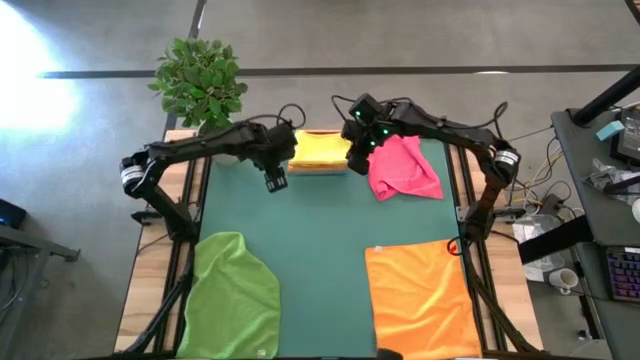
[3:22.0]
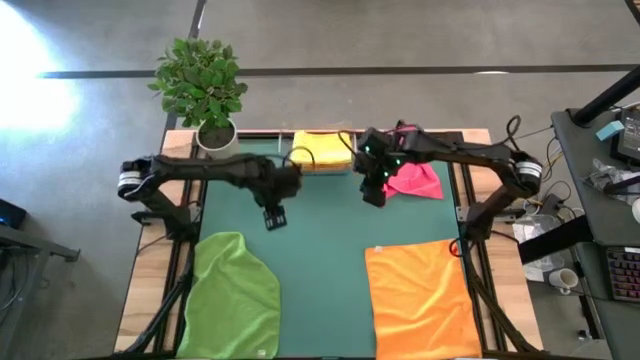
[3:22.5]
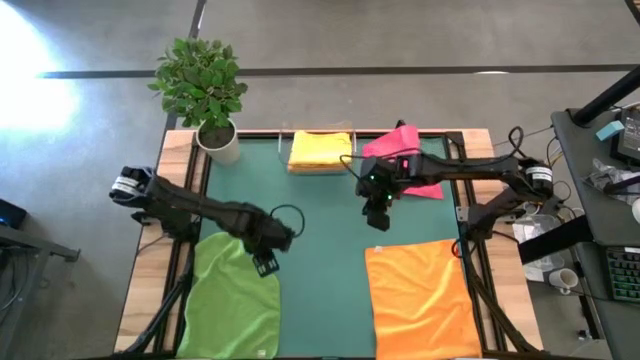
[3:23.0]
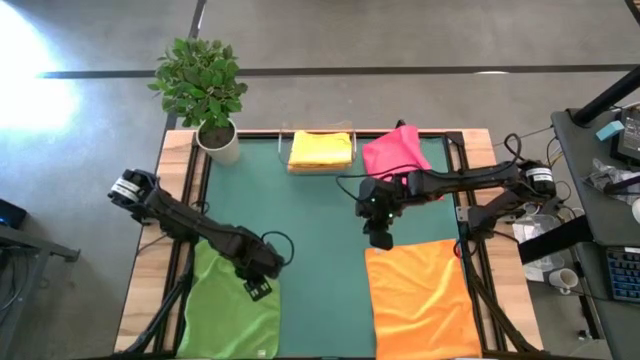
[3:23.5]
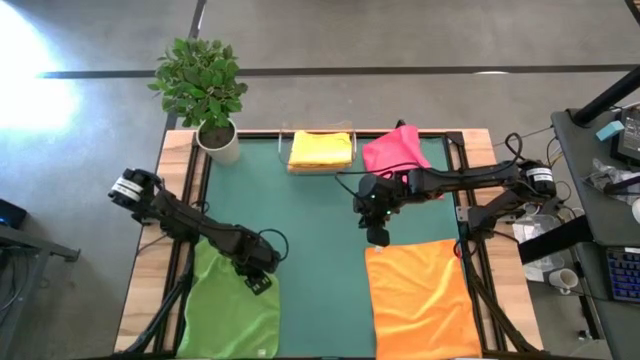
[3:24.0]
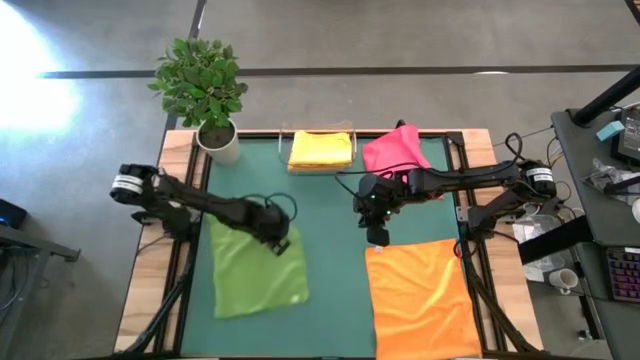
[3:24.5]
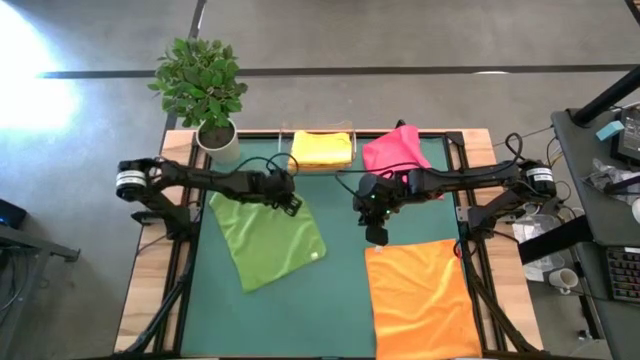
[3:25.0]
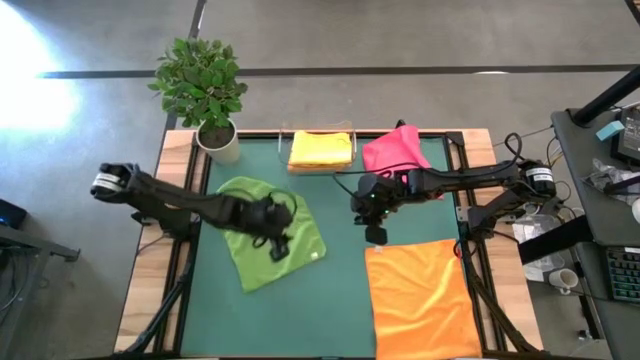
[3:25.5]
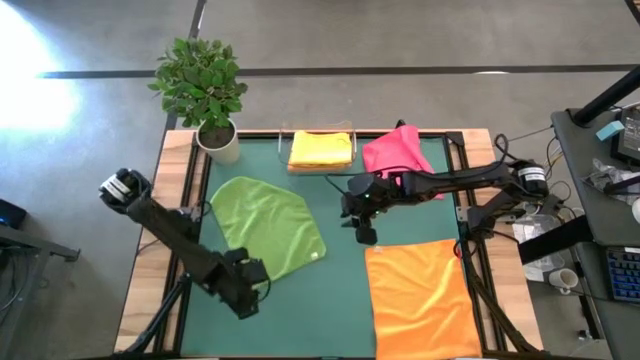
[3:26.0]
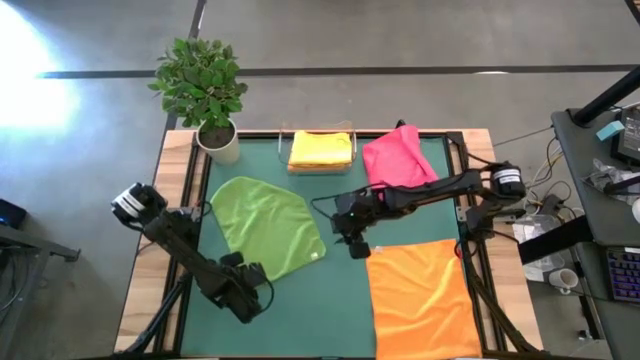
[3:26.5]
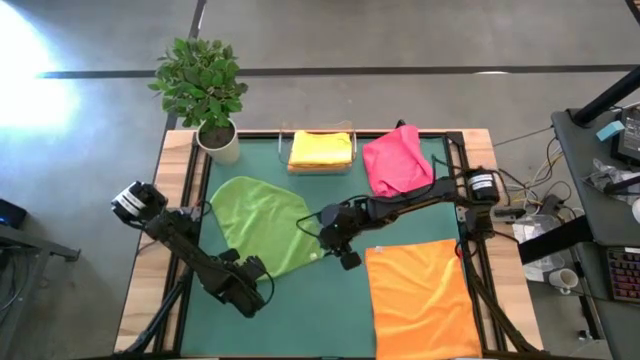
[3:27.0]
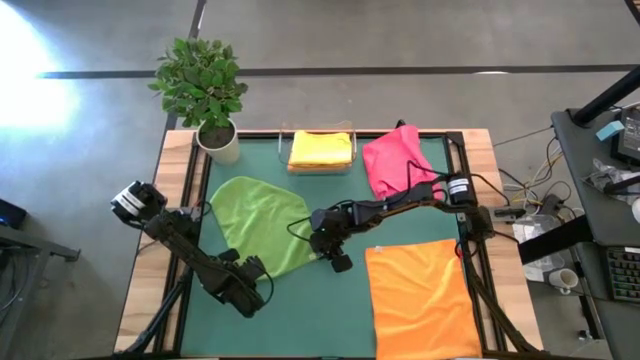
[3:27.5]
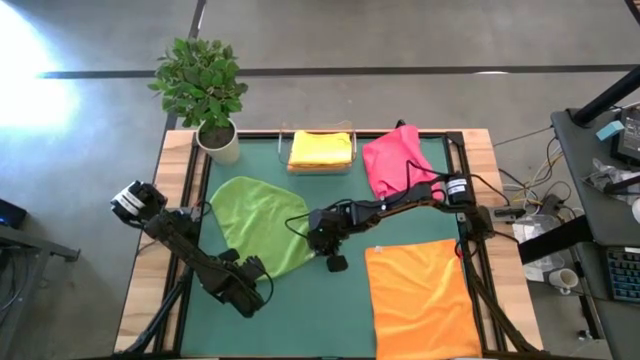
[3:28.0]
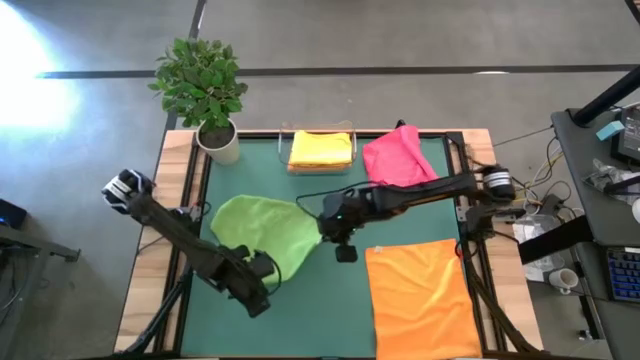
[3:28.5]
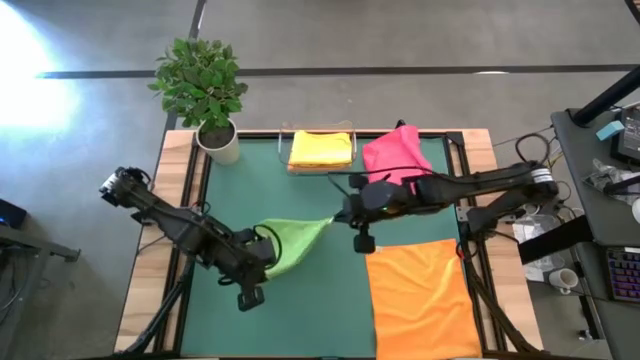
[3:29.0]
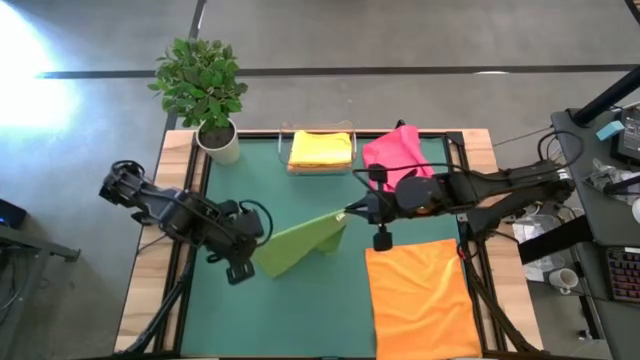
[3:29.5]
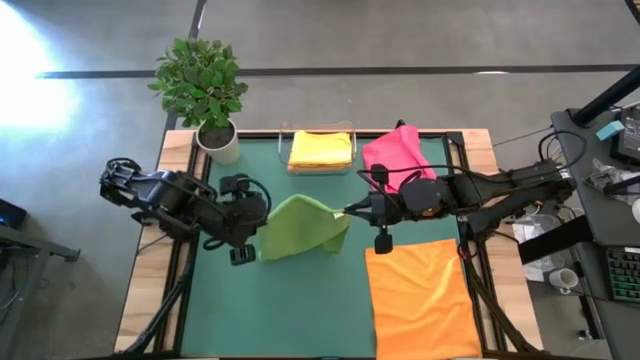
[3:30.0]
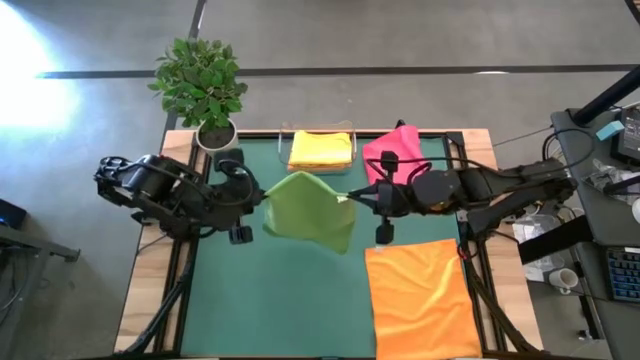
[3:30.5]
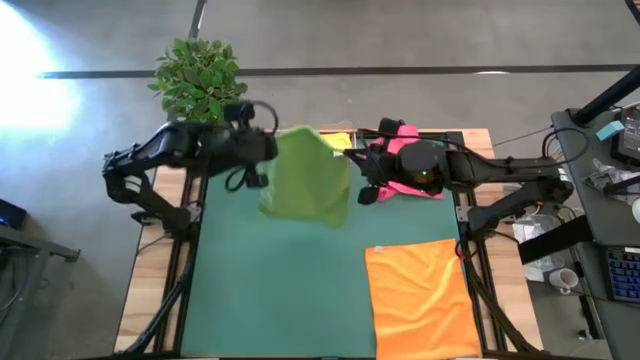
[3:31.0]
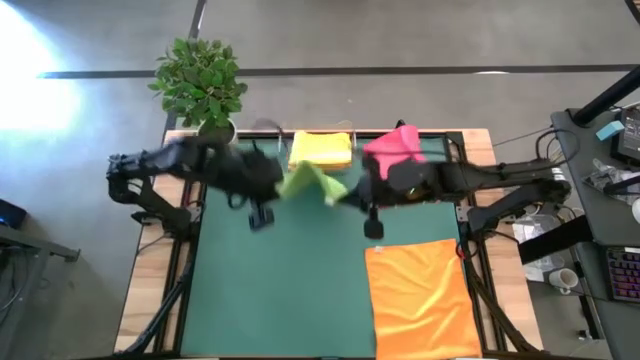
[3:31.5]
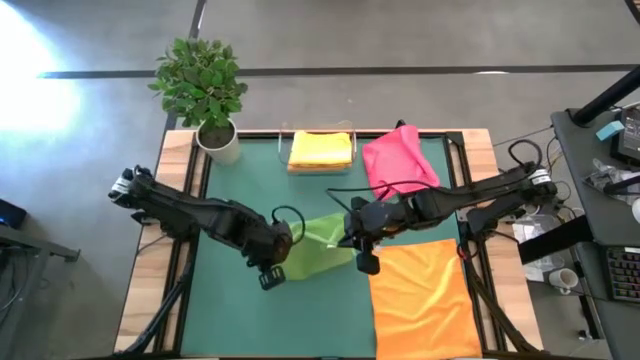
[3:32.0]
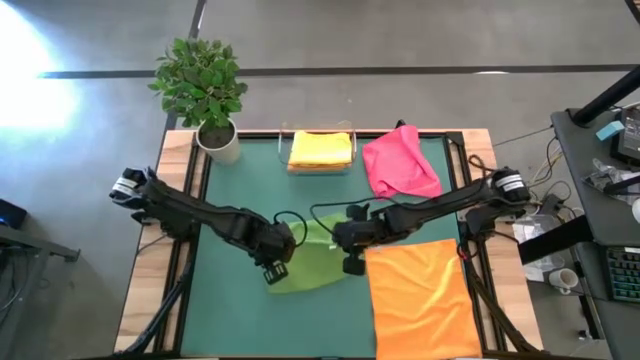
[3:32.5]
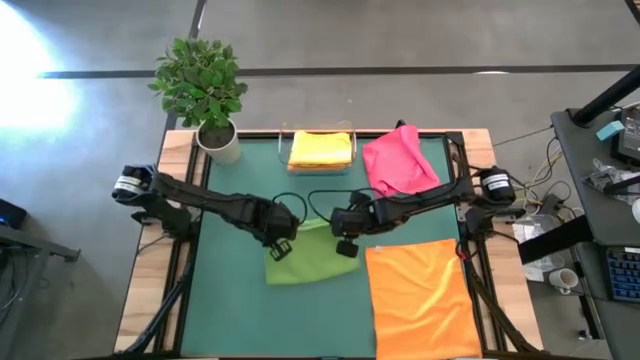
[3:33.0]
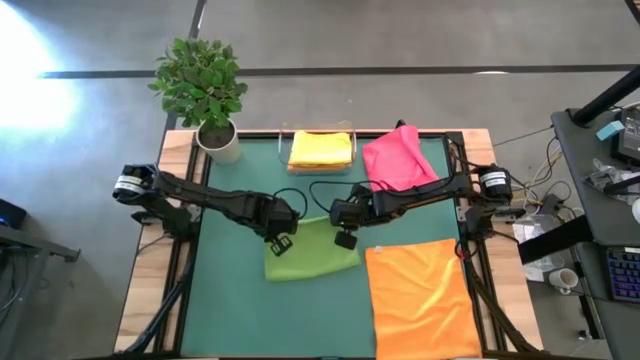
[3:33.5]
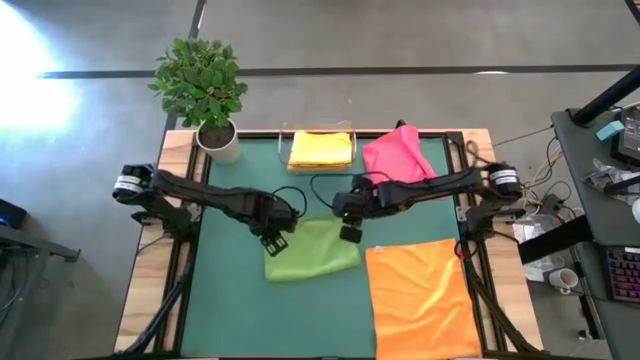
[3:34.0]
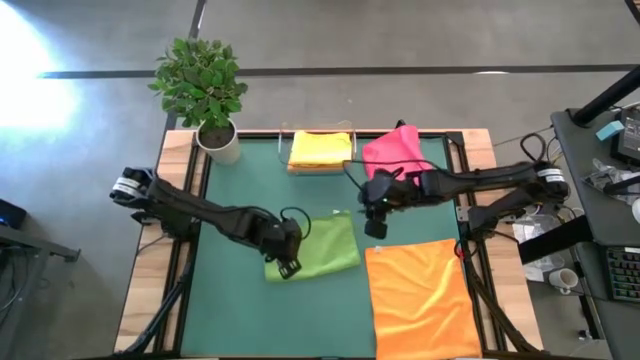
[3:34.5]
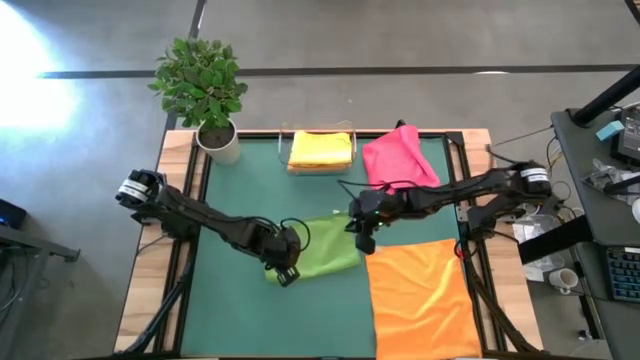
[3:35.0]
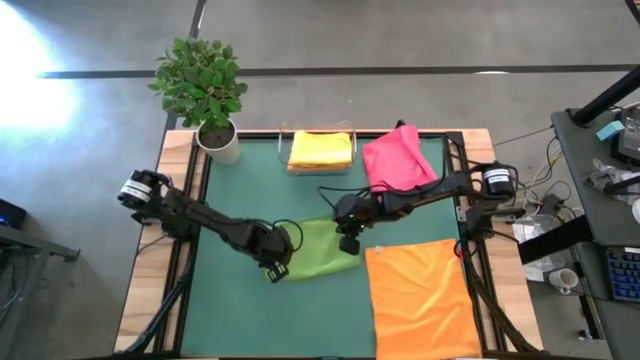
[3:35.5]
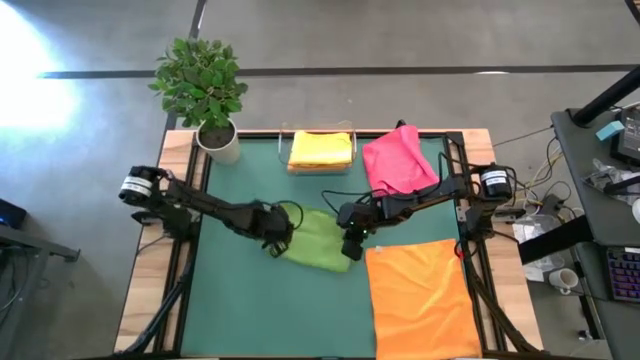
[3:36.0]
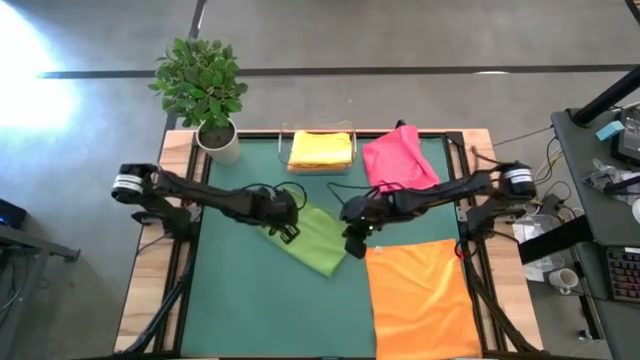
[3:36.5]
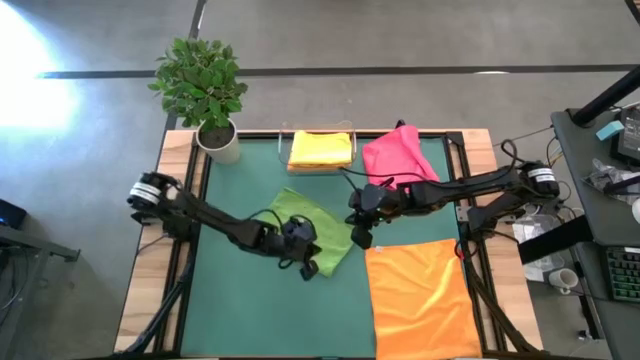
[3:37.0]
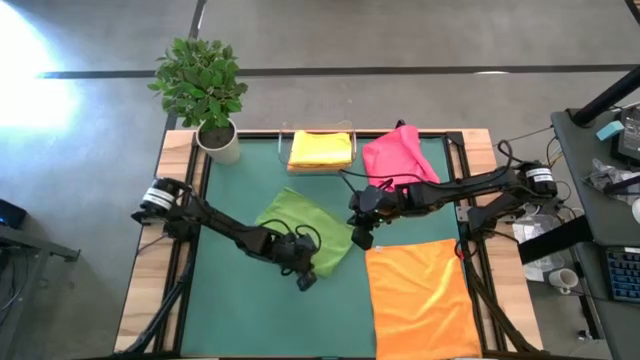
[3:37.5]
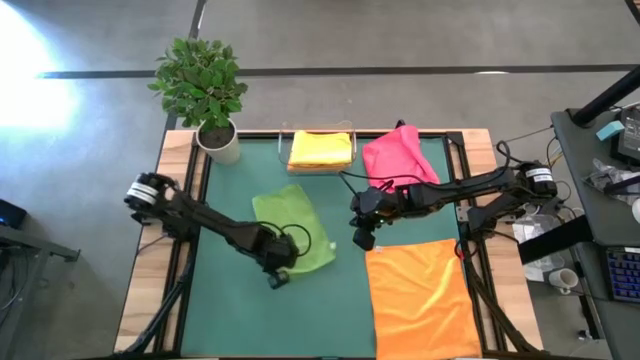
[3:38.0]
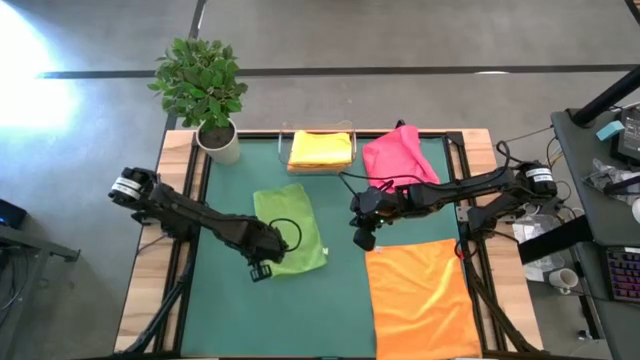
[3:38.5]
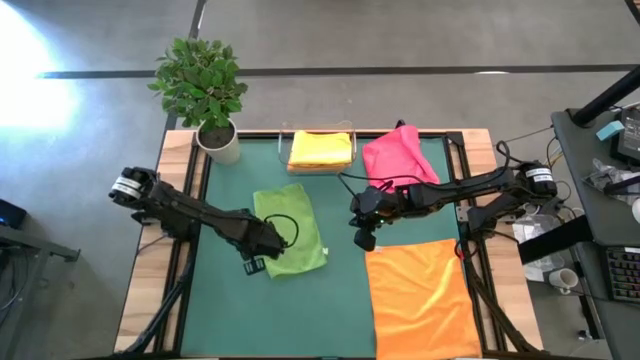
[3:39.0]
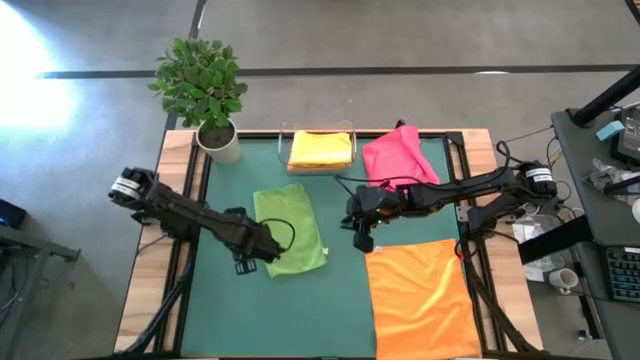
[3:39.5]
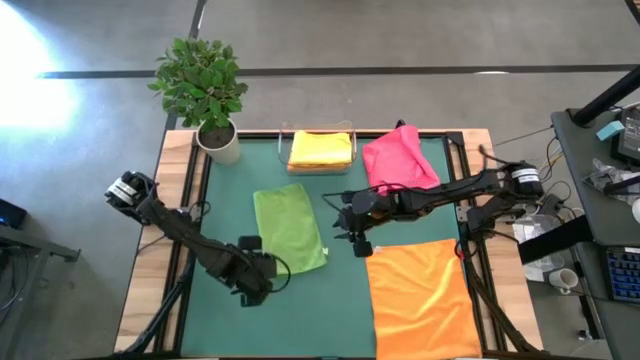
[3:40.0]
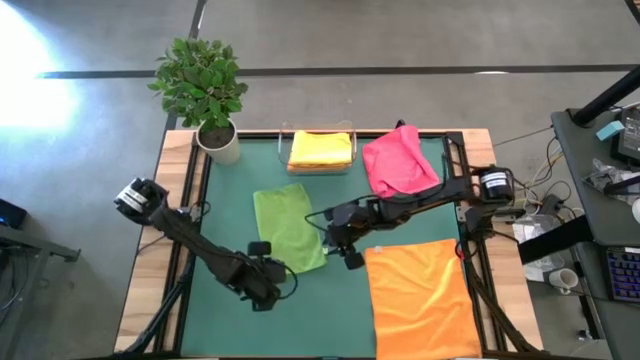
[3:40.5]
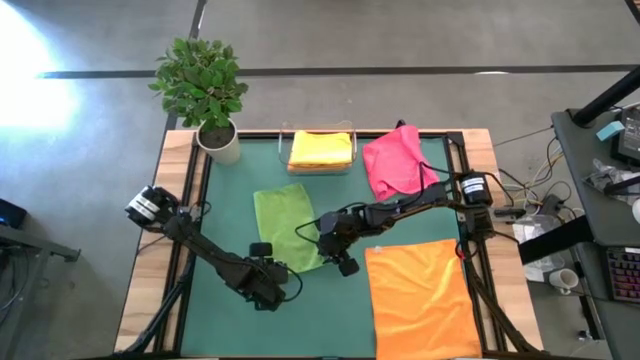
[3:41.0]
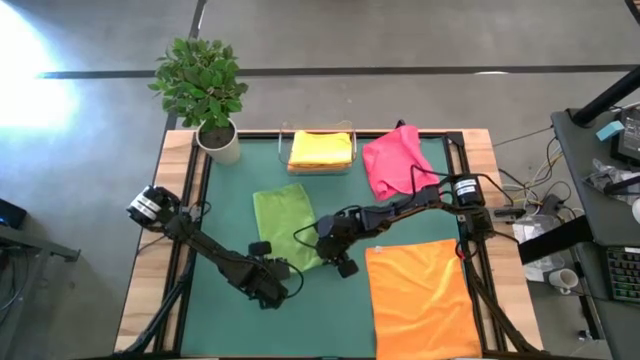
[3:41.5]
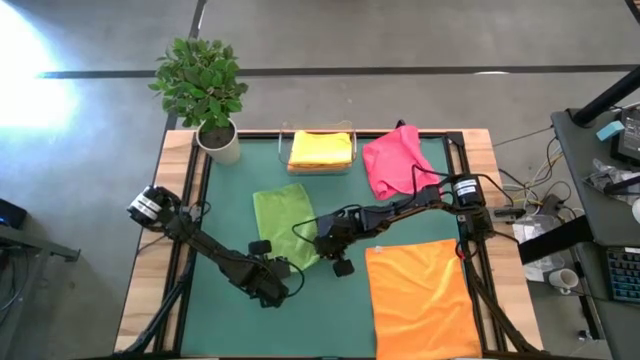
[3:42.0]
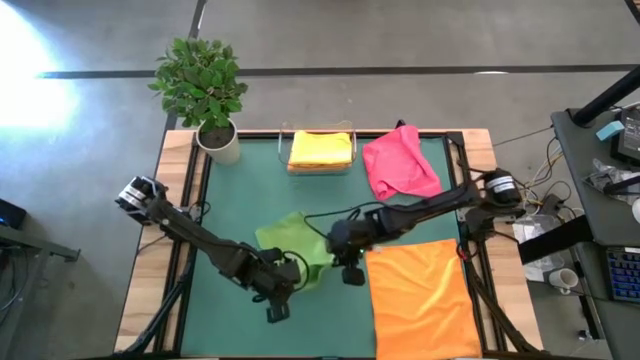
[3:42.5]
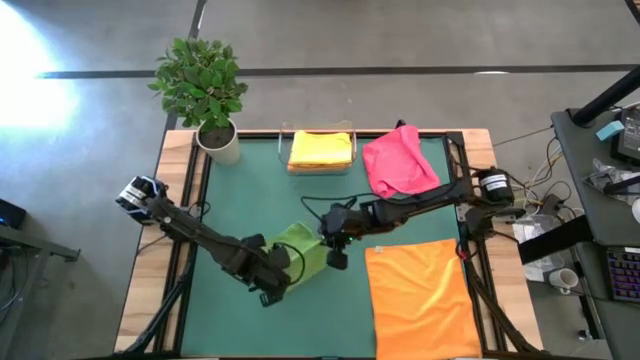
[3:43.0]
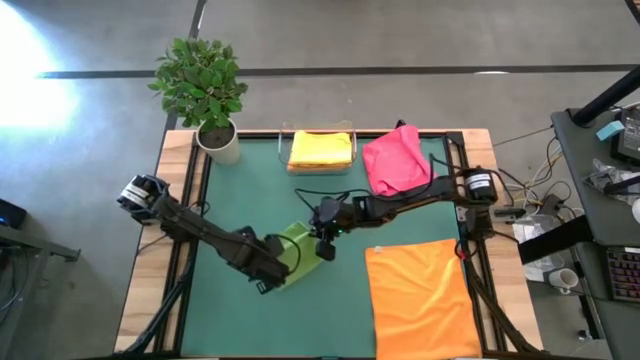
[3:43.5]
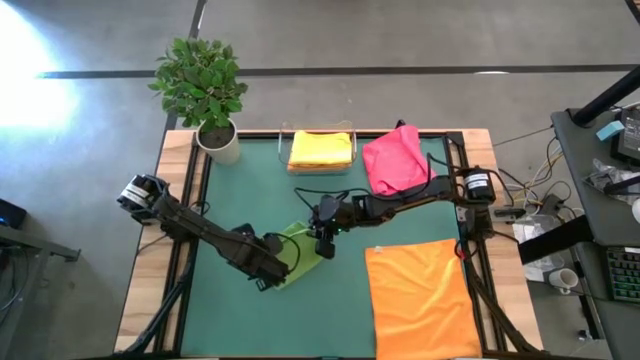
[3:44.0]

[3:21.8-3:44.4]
Task: Fold microfiber towels
Fold the green microfiber towel
